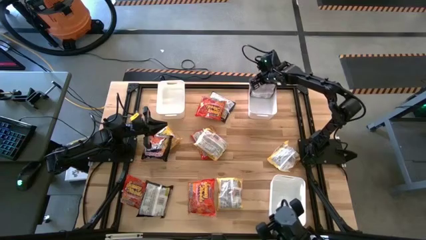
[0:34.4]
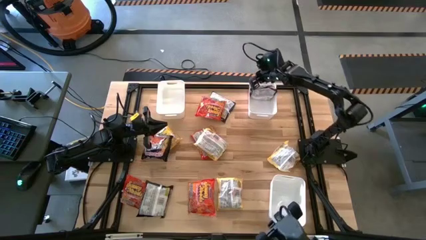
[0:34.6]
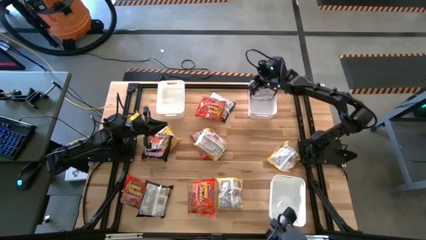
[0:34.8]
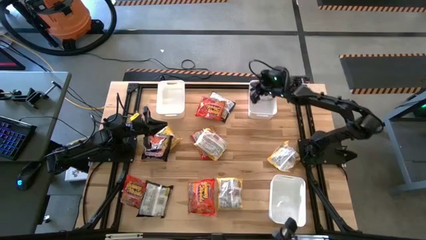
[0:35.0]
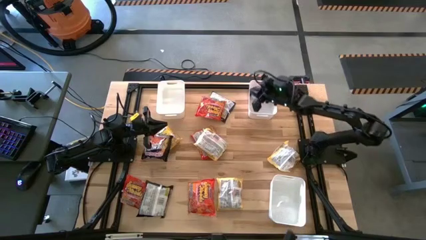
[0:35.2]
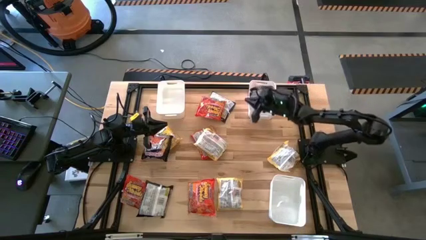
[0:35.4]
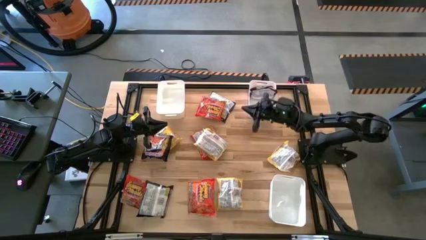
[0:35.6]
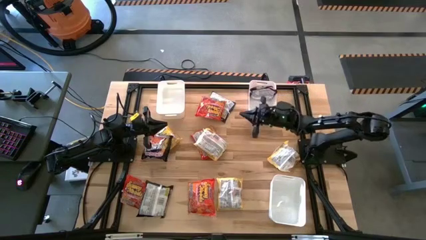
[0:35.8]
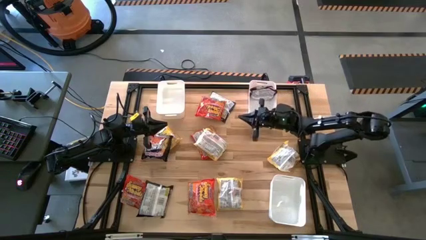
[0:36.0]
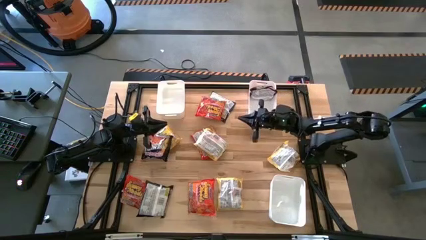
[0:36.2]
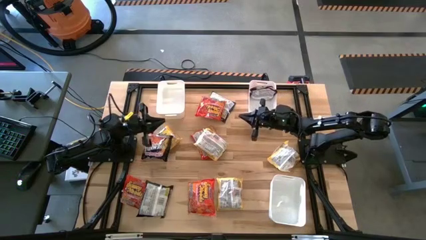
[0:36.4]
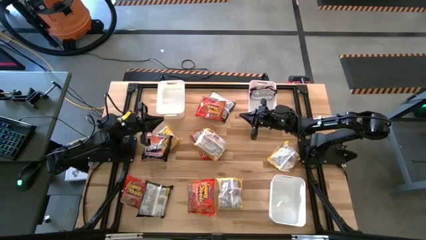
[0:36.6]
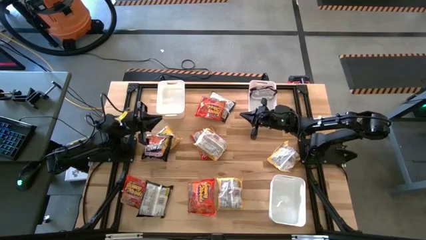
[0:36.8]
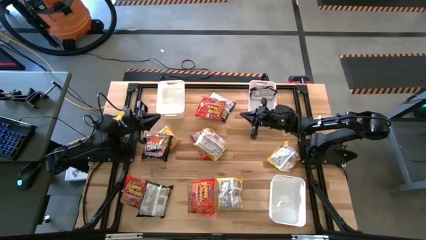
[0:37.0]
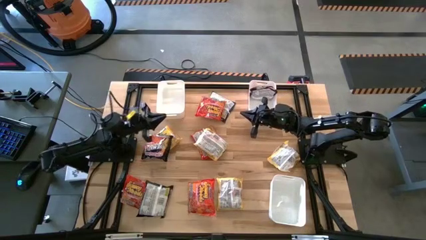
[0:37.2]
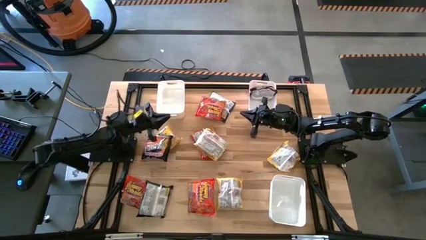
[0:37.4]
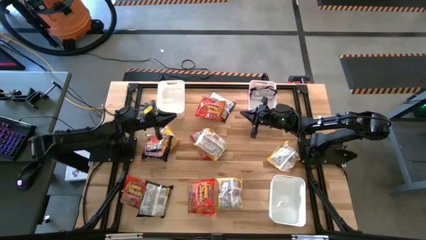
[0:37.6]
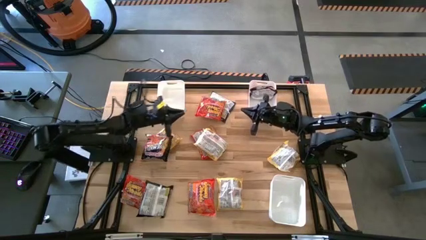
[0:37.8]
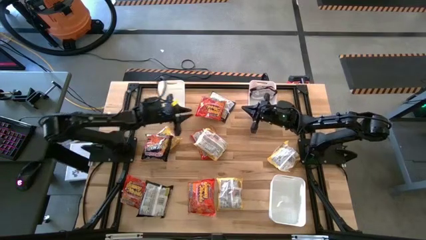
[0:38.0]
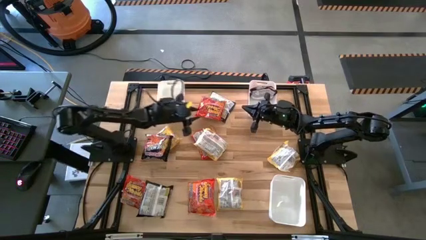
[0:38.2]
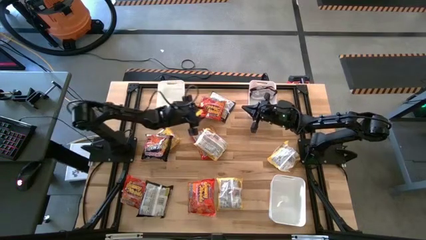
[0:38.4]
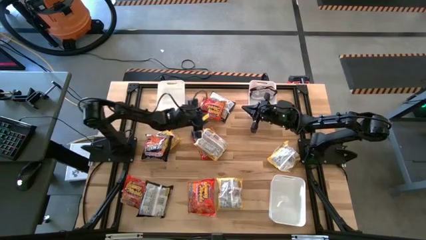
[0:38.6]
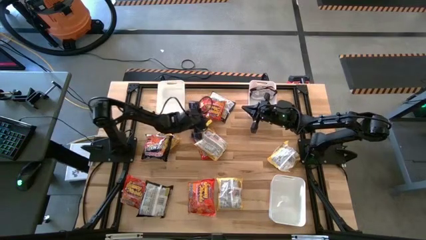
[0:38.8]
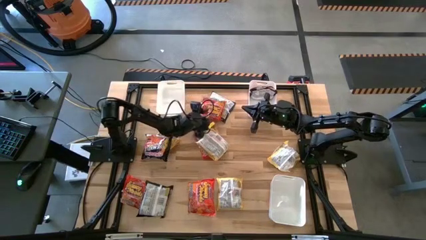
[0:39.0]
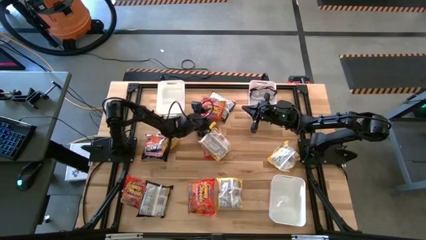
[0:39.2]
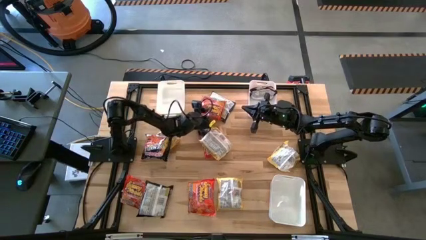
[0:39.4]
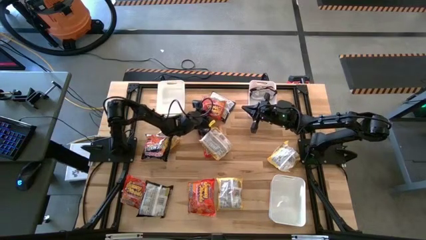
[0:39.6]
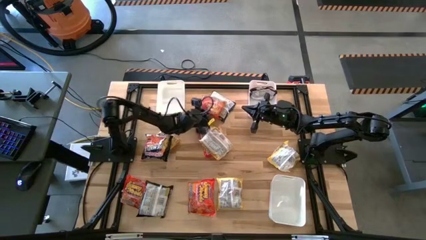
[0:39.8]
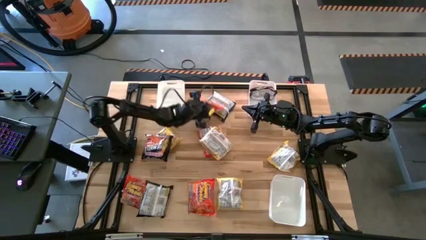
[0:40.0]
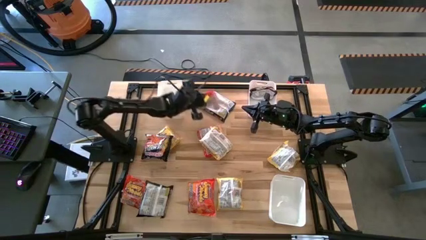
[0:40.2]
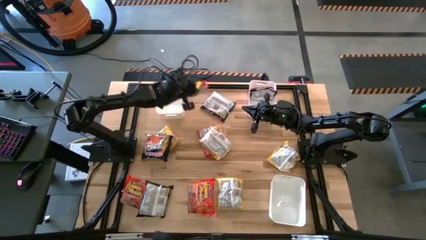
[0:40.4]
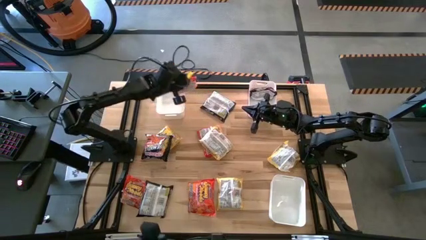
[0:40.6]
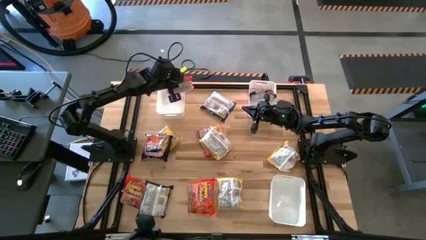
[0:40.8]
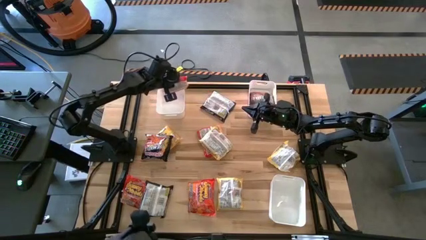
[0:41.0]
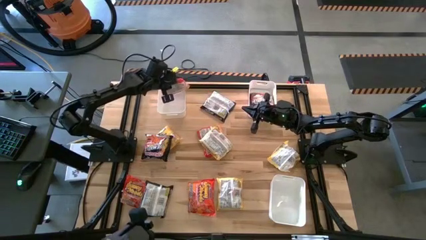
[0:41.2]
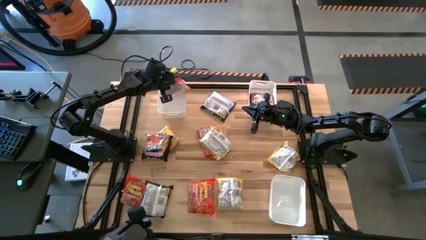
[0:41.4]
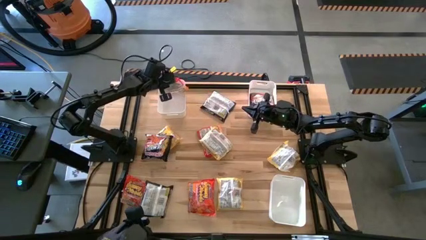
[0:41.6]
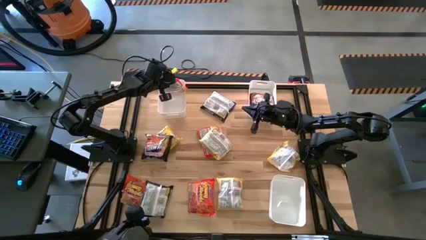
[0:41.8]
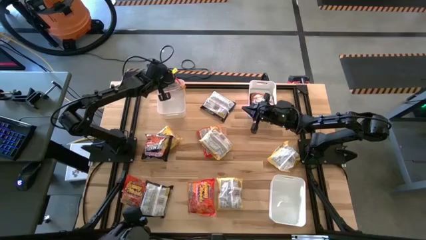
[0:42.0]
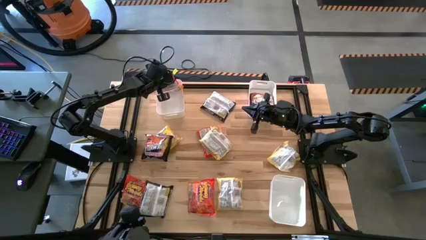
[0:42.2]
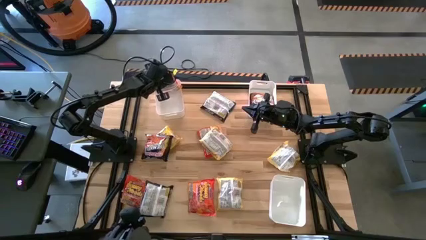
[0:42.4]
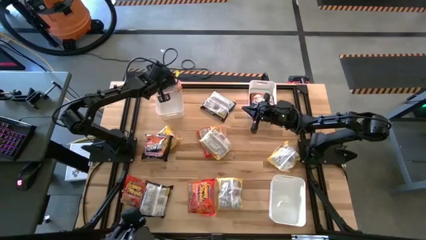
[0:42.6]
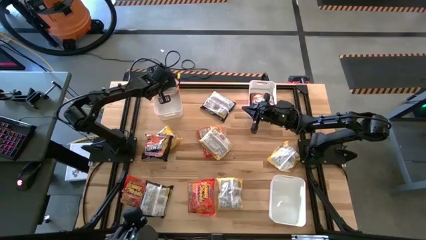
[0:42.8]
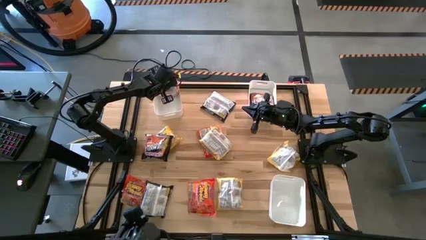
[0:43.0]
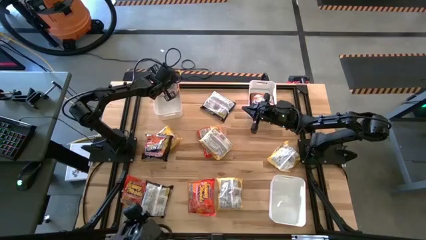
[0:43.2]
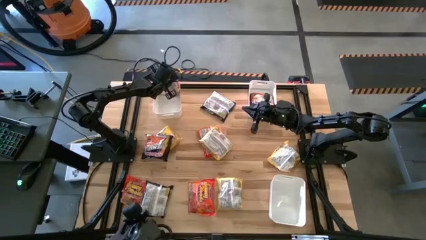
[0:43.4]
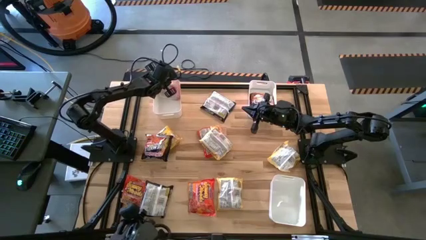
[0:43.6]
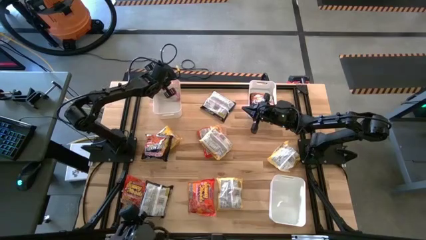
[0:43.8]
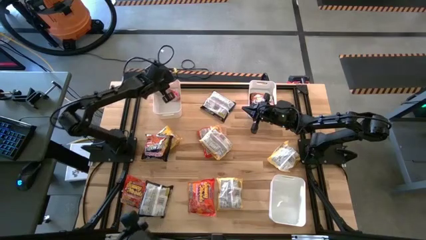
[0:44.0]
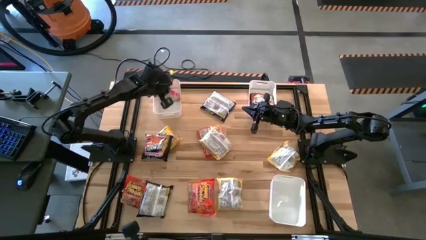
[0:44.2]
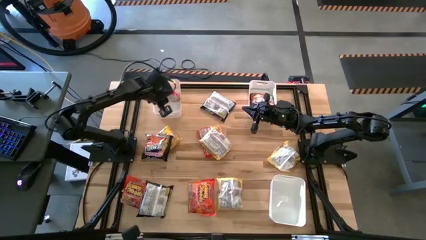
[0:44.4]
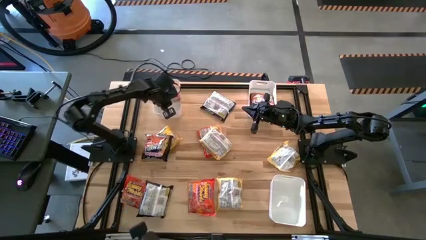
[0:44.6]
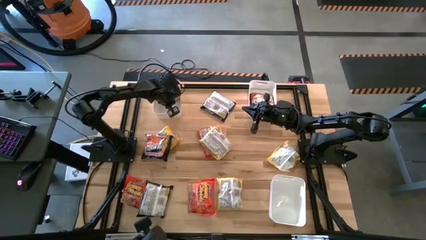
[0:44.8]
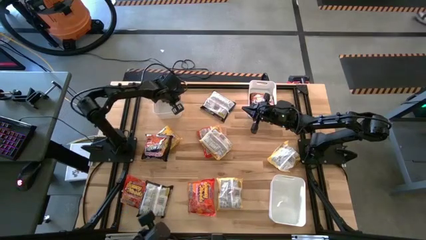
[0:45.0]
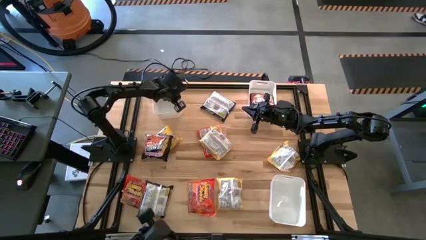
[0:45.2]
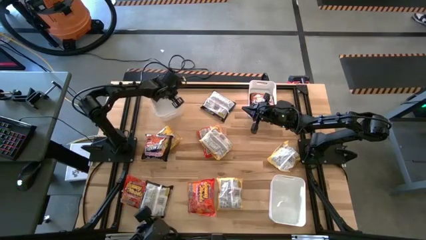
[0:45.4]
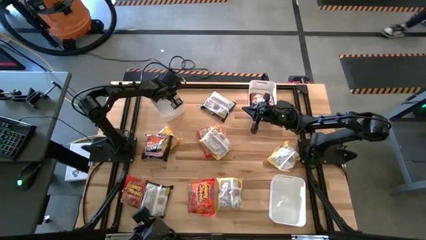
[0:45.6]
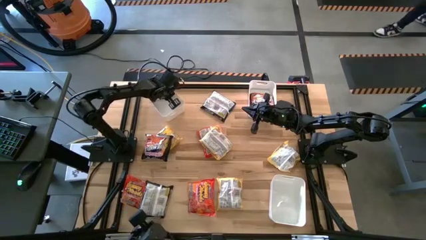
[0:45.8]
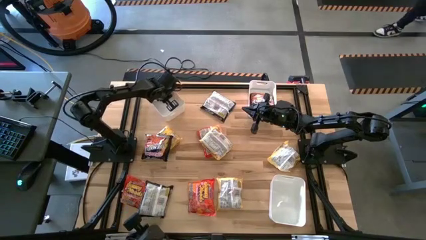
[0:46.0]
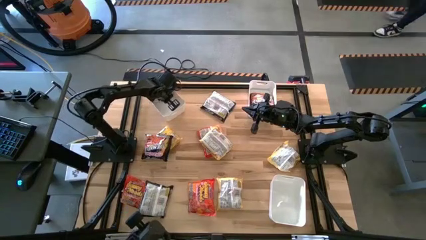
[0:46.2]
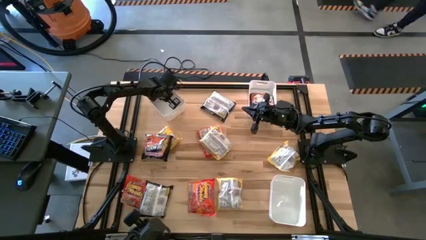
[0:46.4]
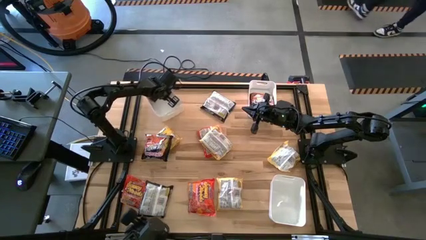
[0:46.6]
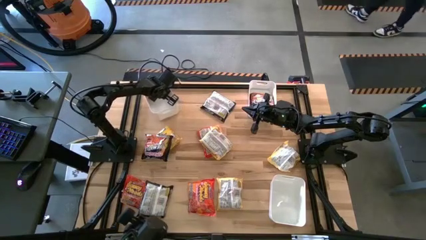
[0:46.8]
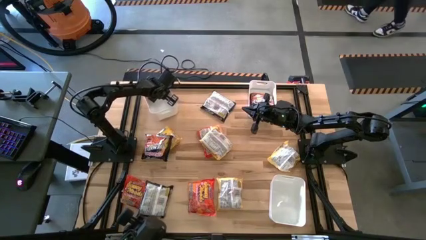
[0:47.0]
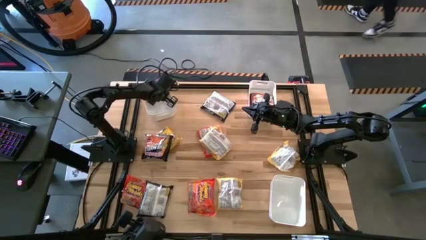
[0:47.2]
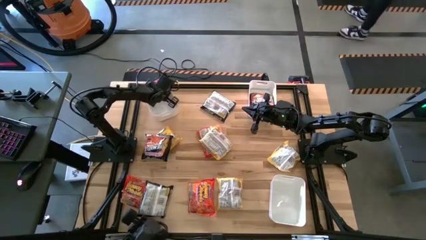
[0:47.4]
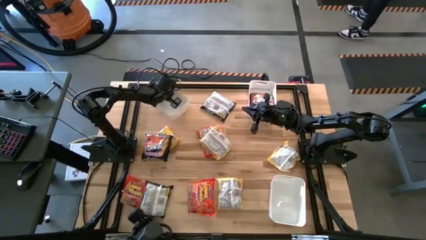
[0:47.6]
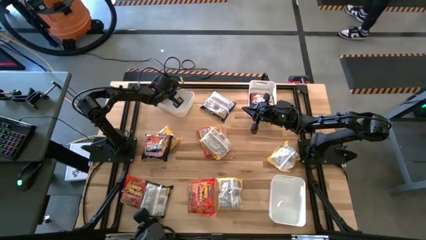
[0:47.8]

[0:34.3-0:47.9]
Task: Sort Maruchan noodles
Put the orange noodle pack into the top left white bin
